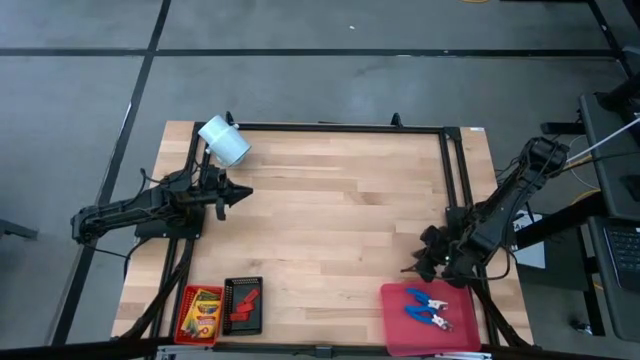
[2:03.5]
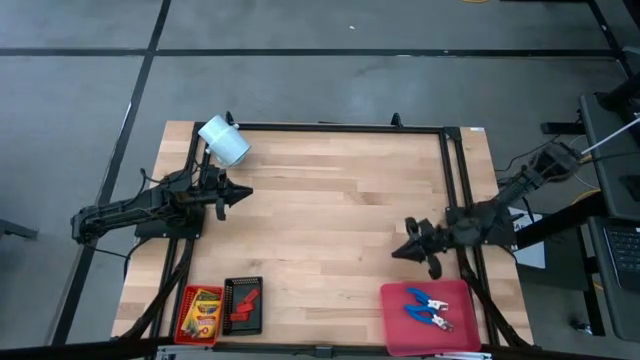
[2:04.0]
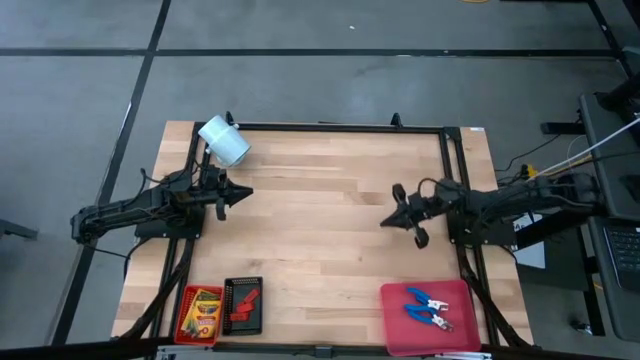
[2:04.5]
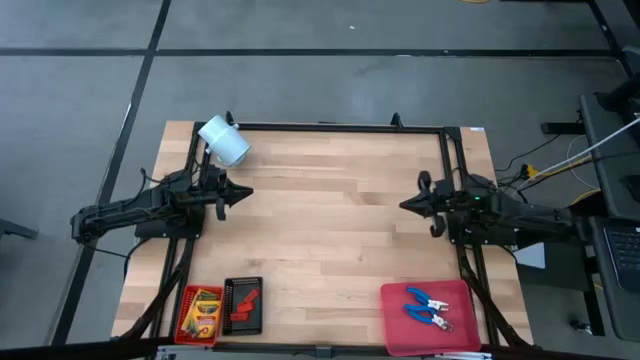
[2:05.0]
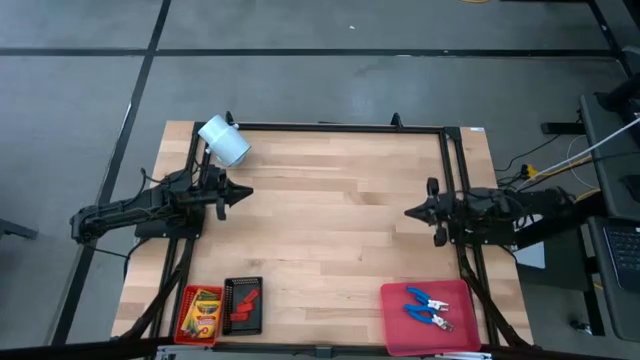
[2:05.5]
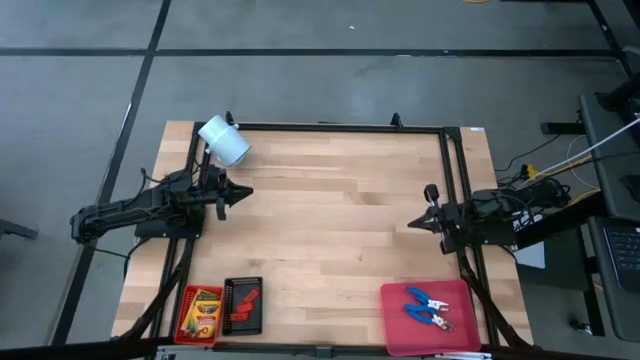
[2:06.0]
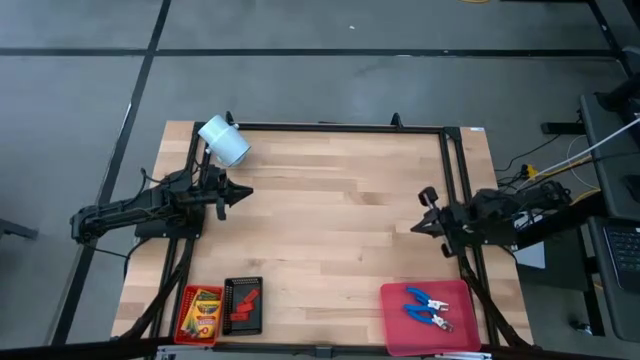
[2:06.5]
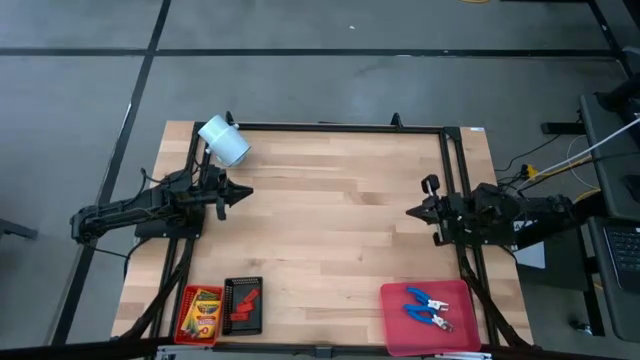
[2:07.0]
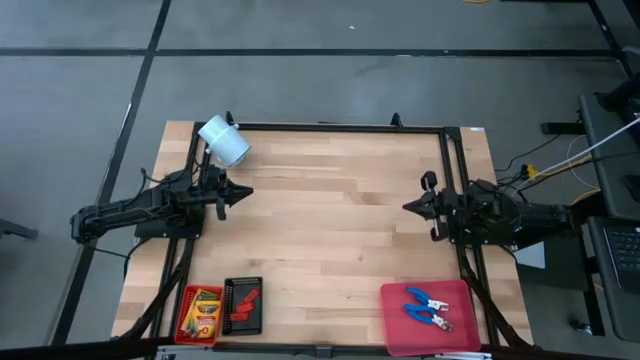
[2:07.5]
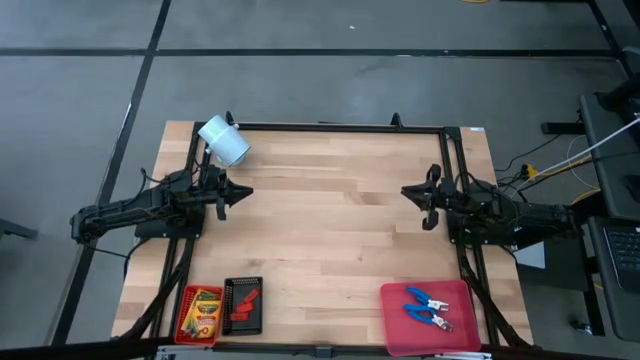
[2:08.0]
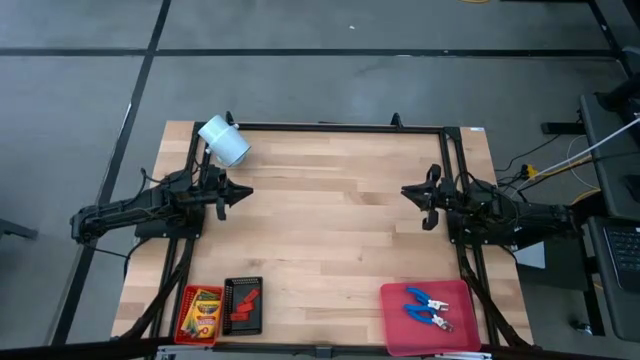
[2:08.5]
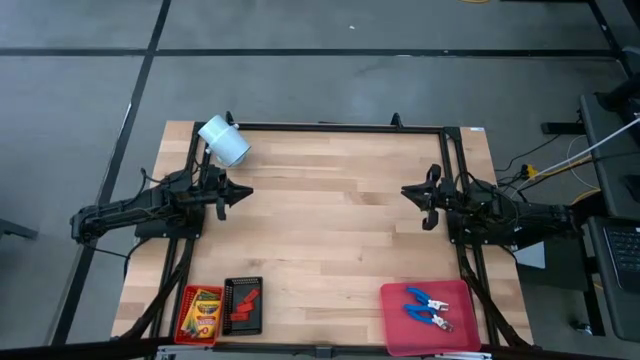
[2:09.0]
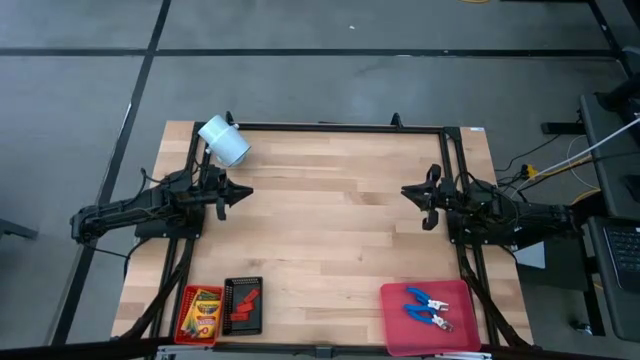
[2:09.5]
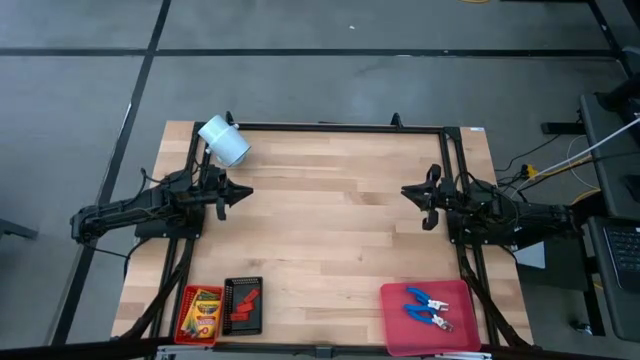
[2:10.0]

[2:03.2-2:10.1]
Task: Pick & Place School Supplies
Return to Home Position

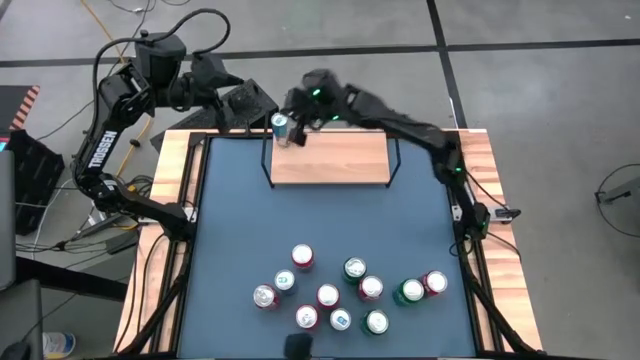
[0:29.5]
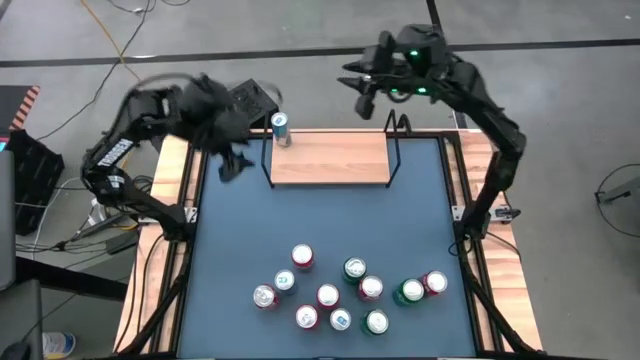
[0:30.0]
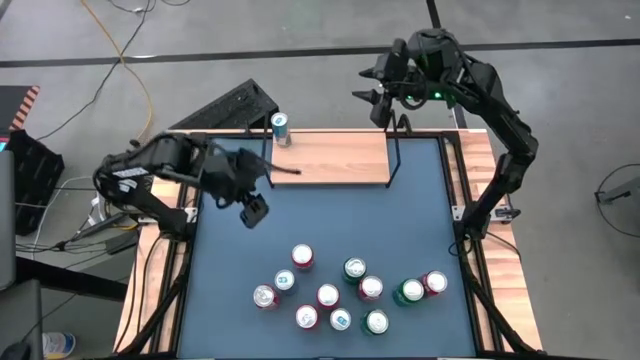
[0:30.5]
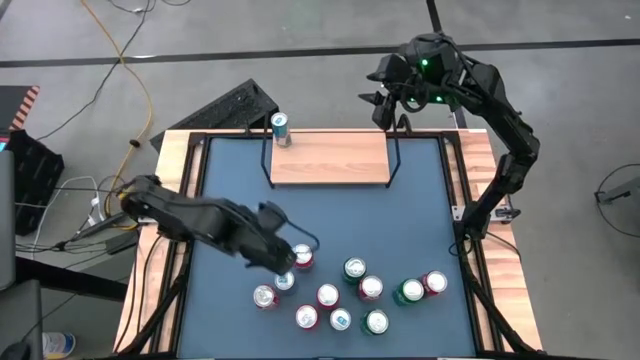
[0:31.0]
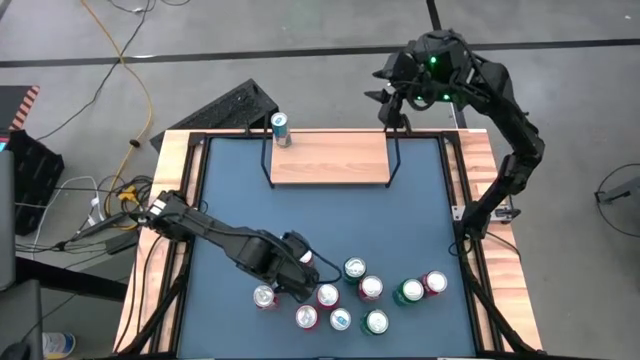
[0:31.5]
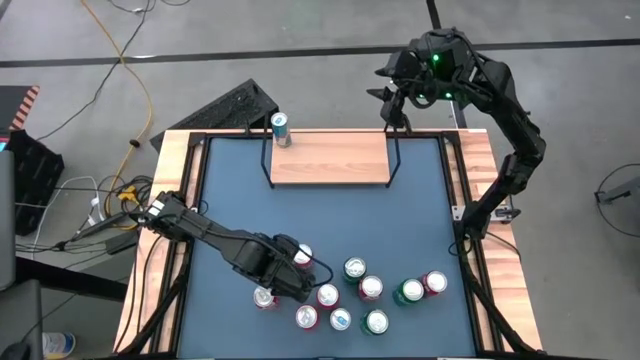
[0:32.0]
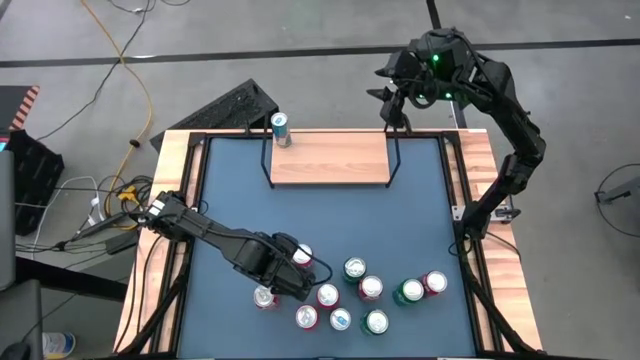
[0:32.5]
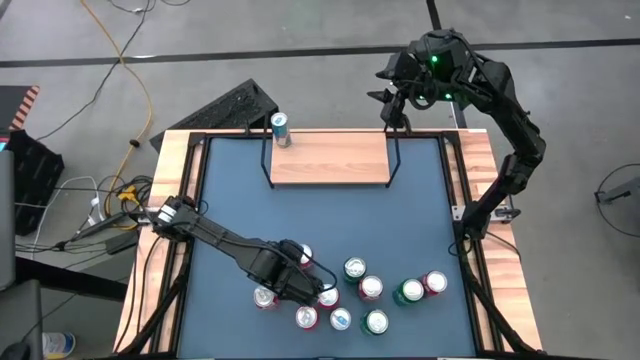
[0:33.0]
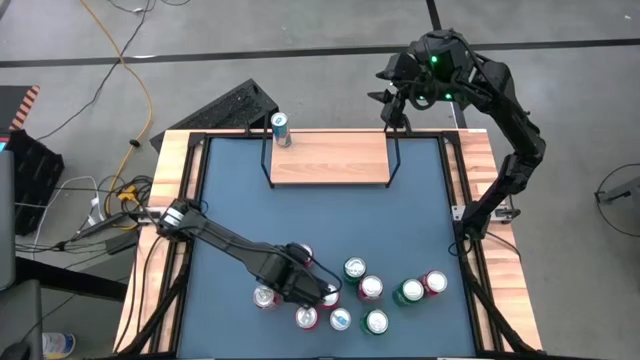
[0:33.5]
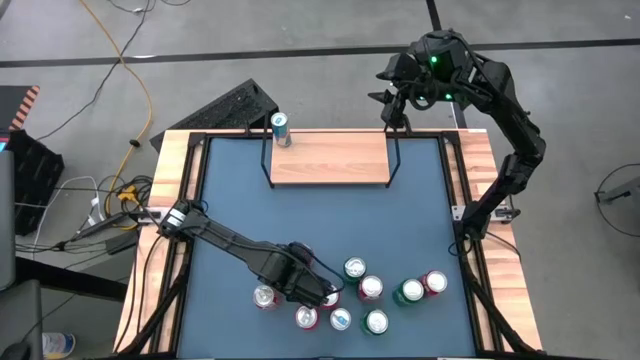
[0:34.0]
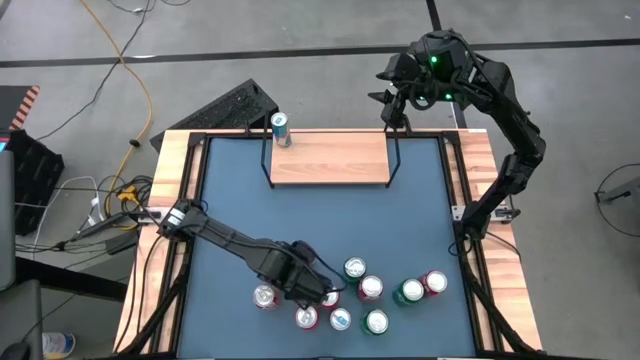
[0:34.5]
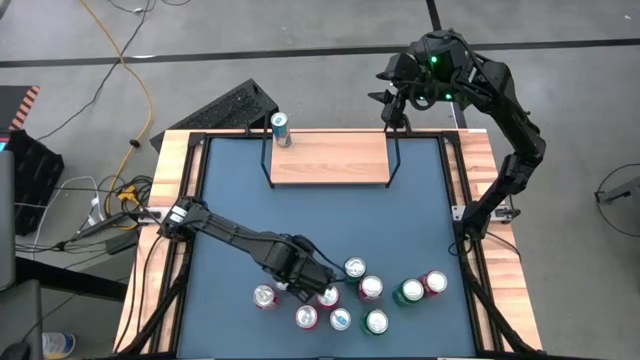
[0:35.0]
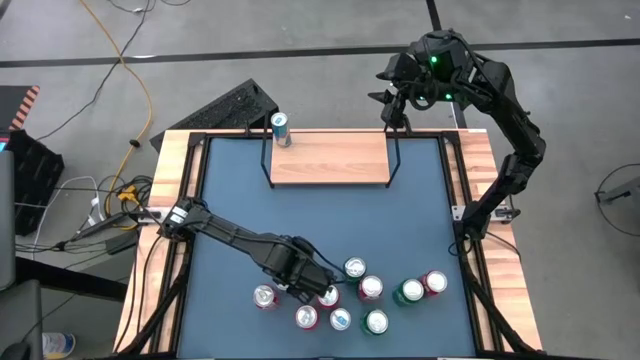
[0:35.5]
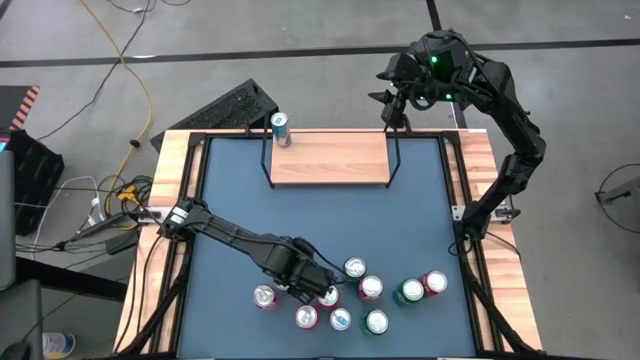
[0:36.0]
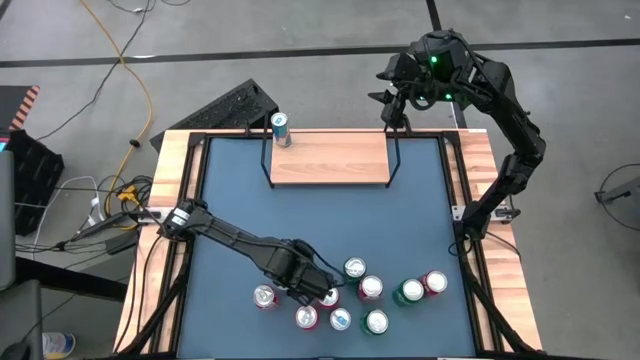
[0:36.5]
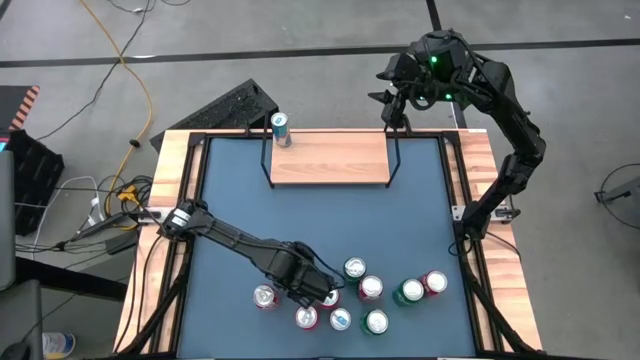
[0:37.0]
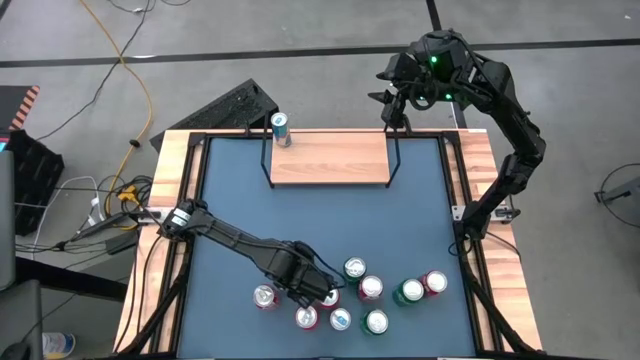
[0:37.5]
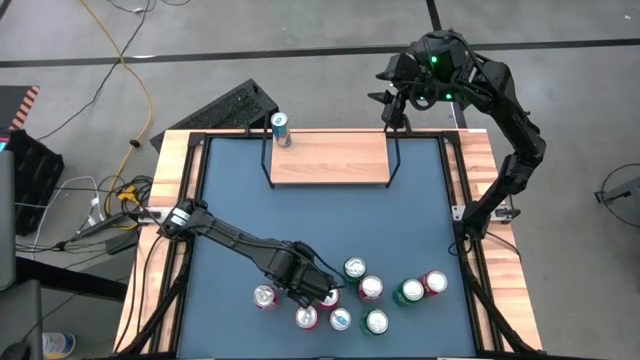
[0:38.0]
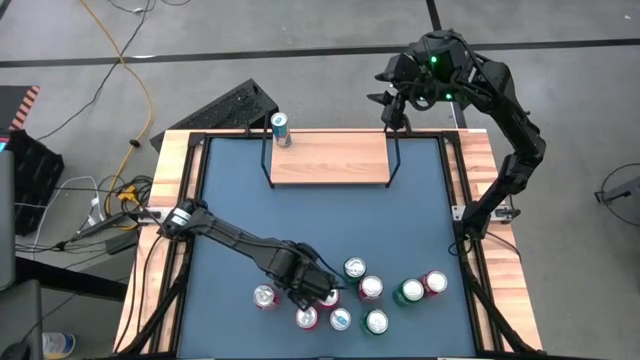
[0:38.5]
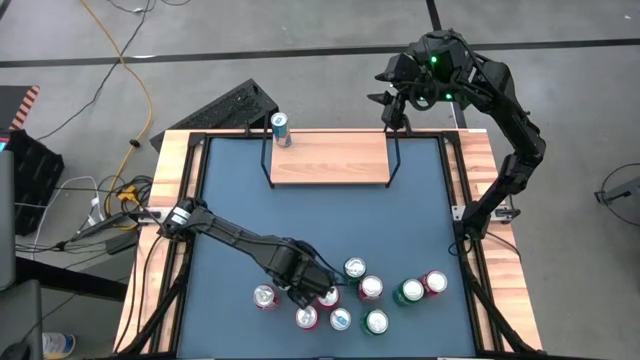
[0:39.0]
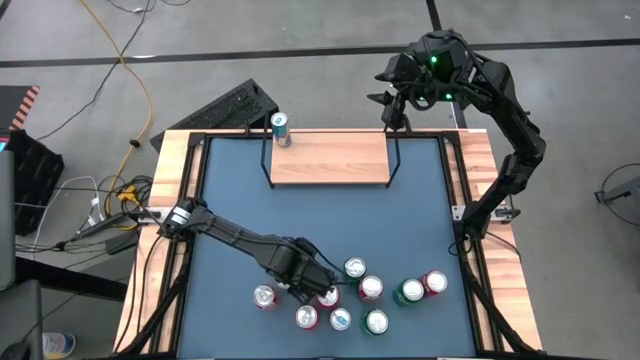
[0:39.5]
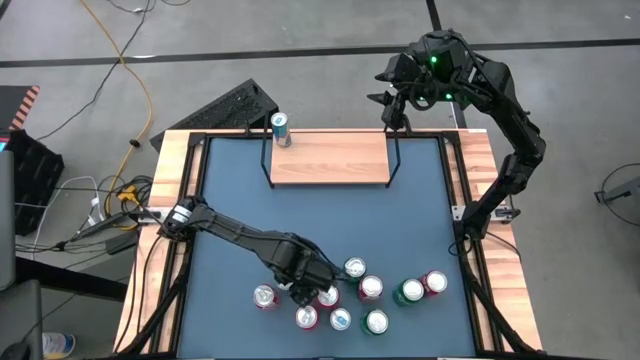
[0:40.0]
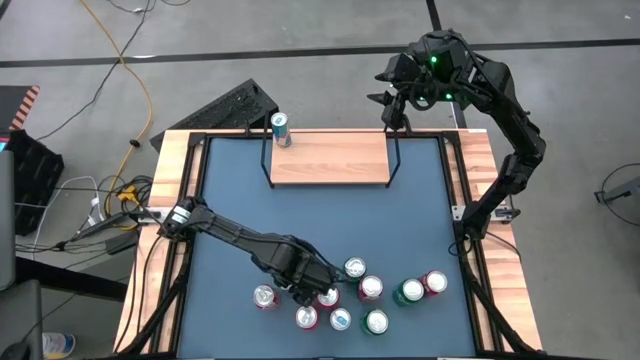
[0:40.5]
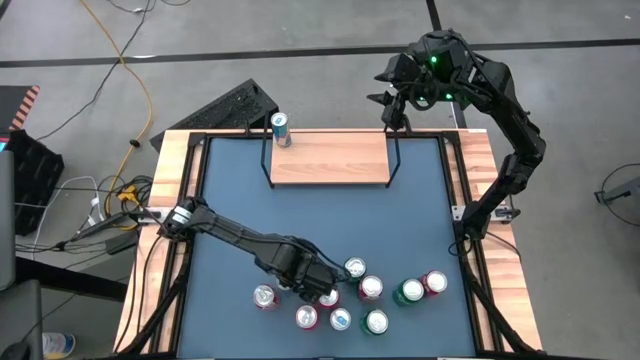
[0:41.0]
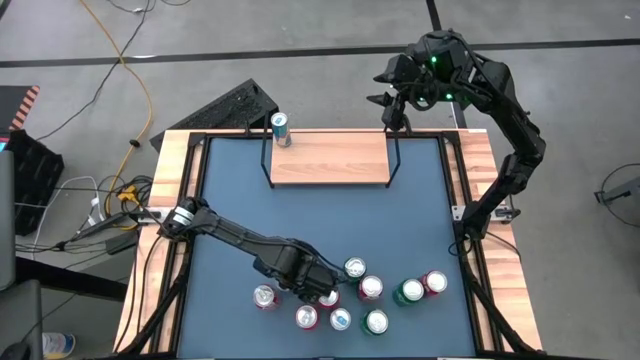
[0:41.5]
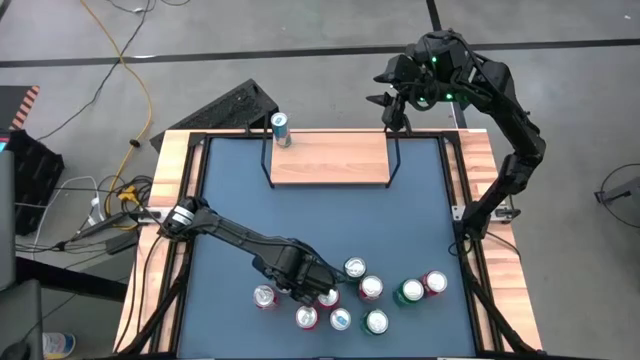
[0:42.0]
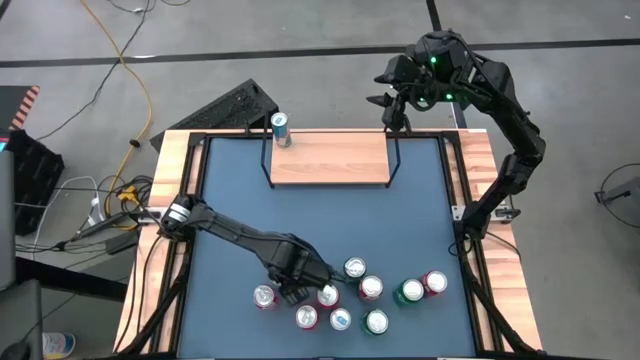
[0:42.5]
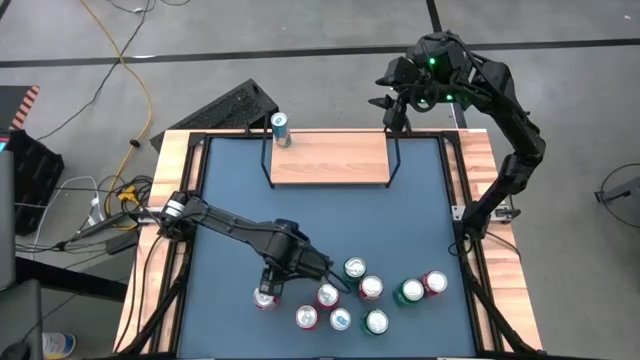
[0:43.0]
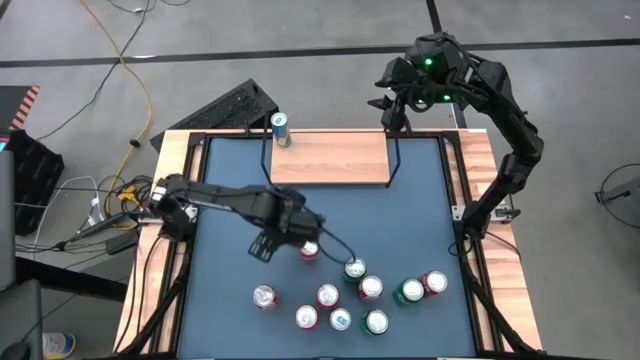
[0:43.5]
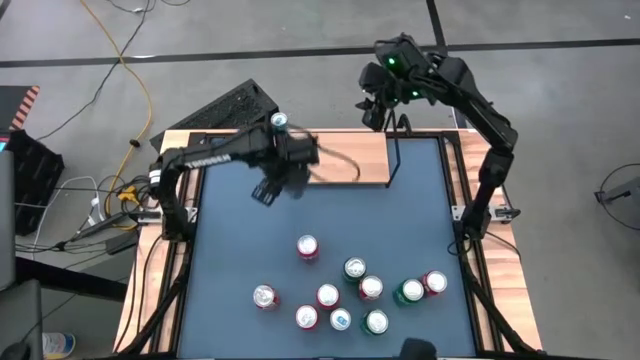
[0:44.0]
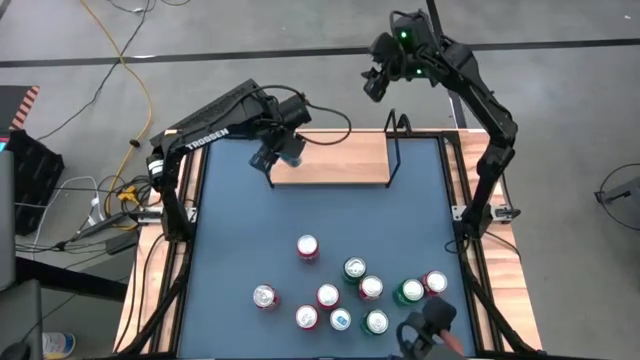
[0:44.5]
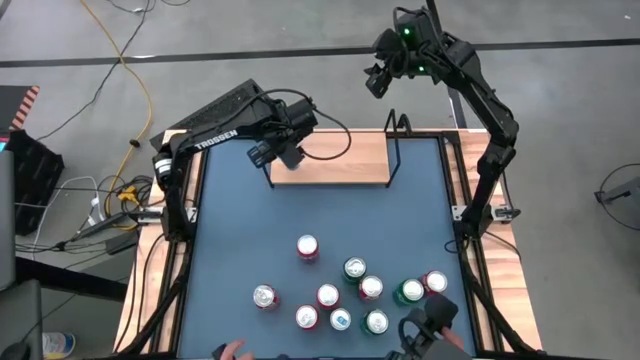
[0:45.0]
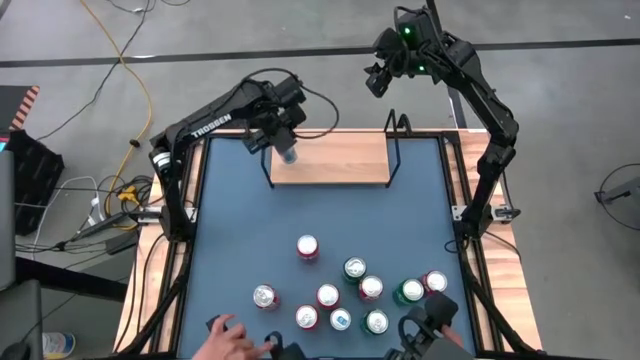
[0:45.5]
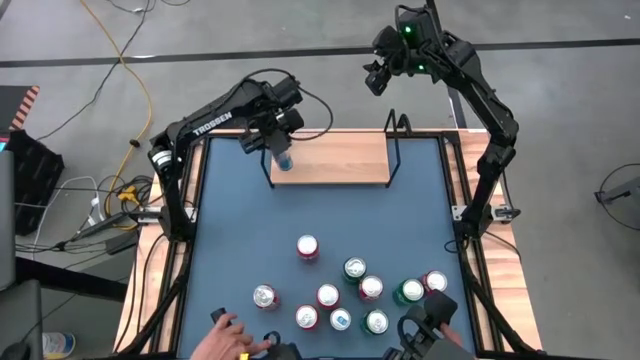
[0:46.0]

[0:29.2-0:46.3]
Task: Place canned beverage on shelf
Put the left blue soda can on the shelf aligned with the other blue soda can
